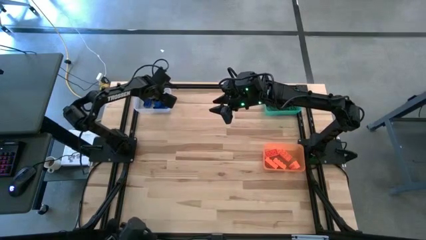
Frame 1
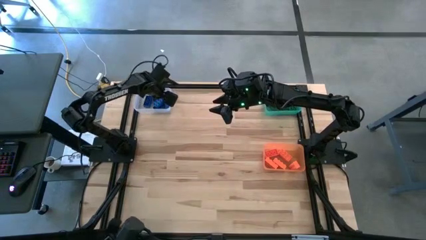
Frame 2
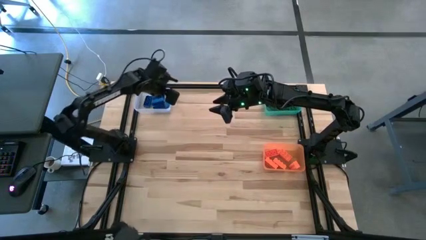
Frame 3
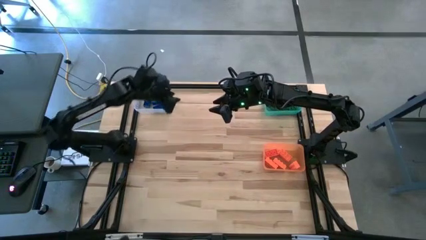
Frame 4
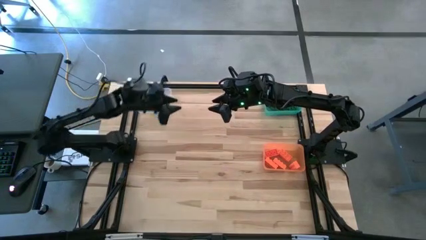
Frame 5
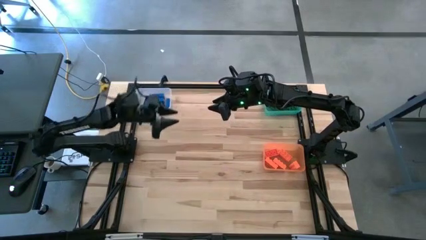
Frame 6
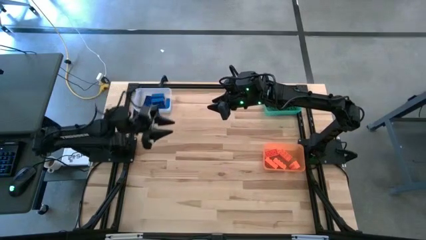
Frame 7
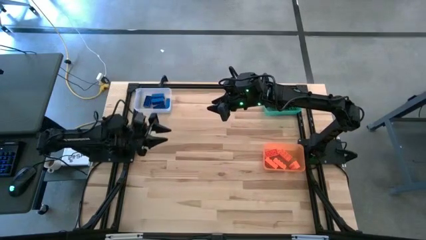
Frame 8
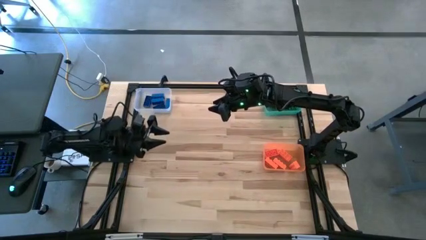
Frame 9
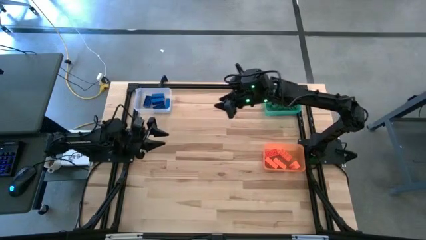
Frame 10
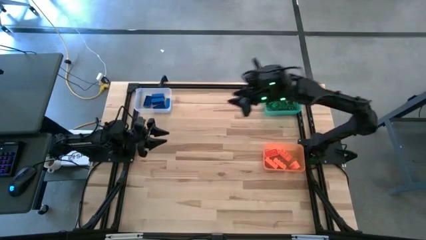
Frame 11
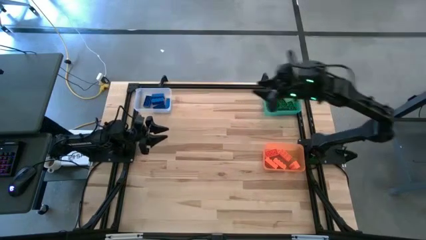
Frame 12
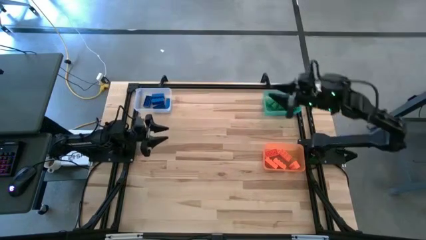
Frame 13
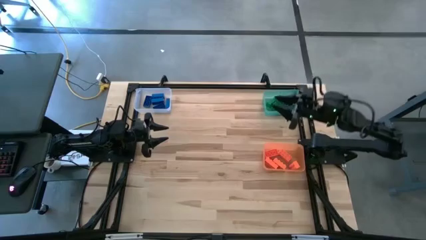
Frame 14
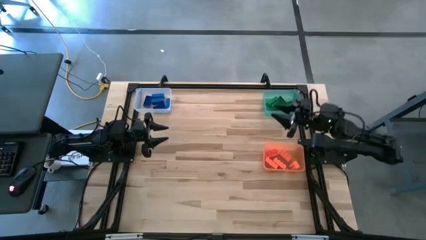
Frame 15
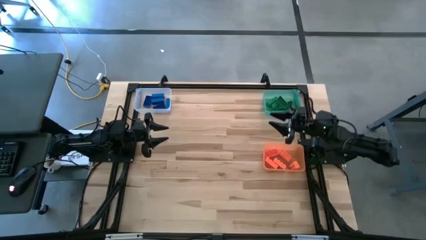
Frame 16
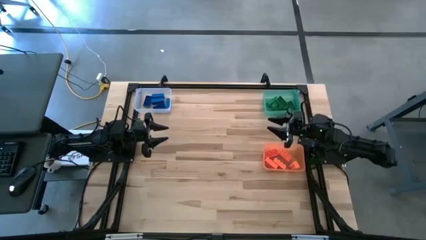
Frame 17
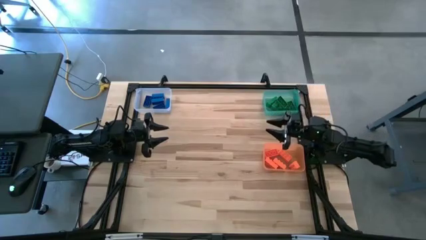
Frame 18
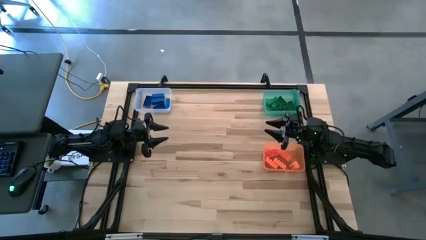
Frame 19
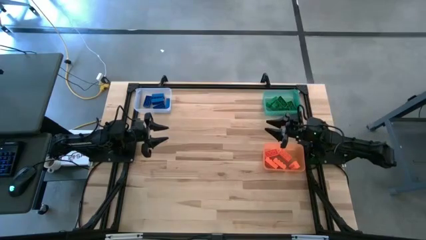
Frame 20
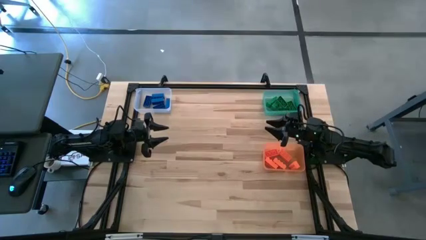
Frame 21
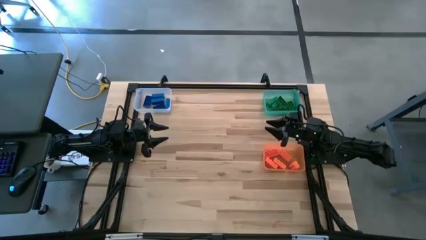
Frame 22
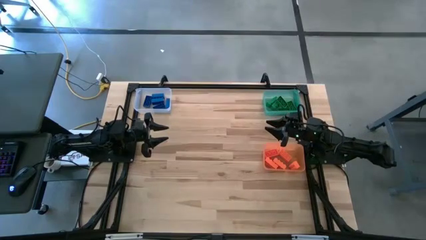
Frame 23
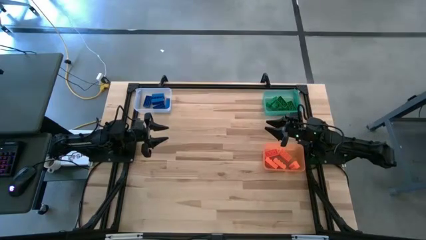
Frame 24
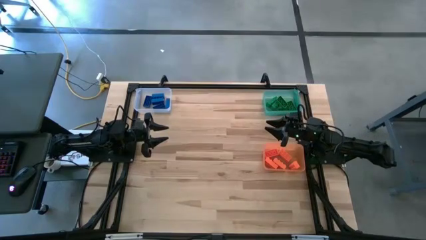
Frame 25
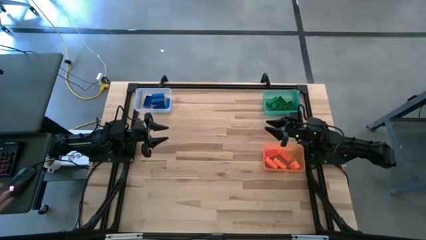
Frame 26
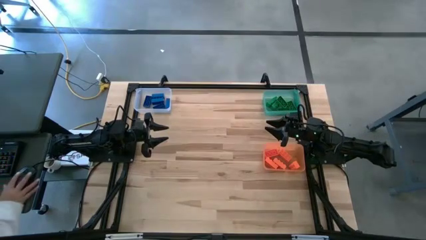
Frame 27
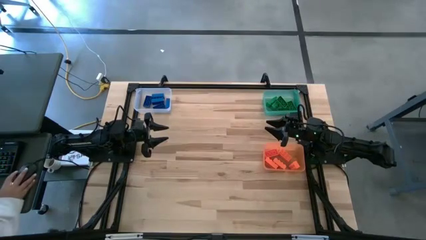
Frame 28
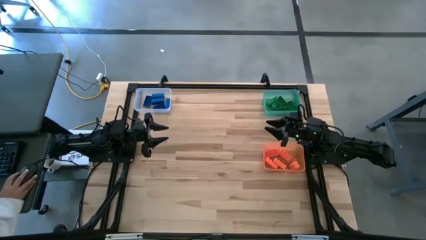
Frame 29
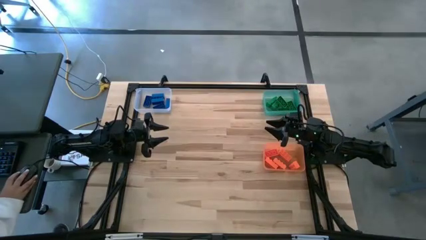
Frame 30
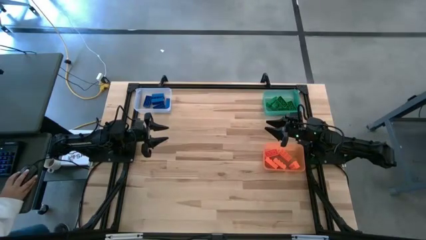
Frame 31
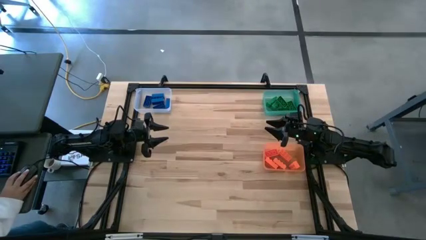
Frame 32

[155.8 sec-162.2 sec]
Task: Sort & place blocks by color
Return to Home Position

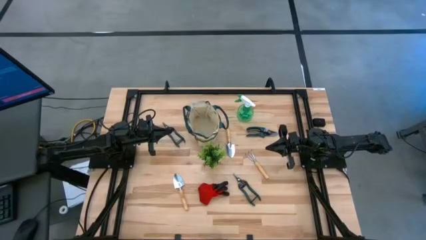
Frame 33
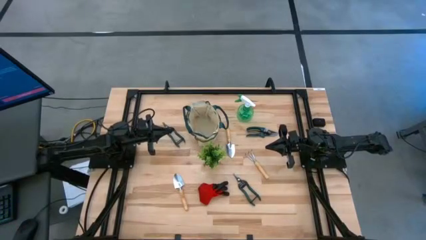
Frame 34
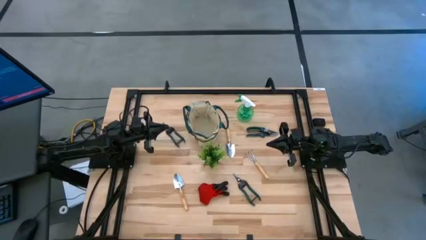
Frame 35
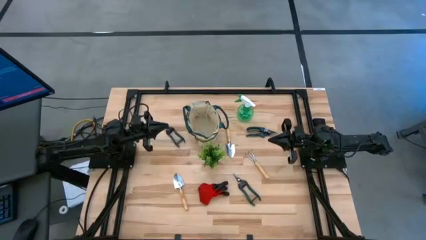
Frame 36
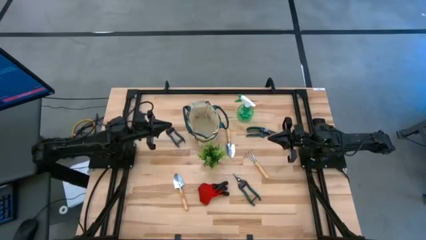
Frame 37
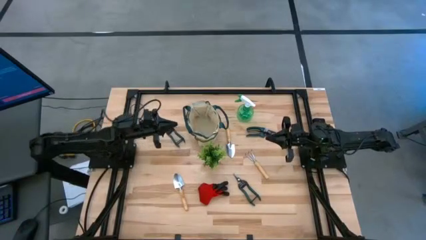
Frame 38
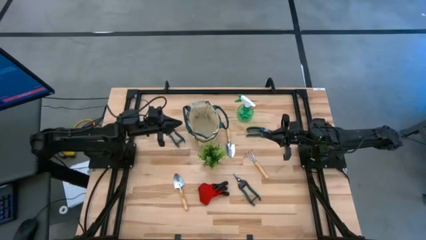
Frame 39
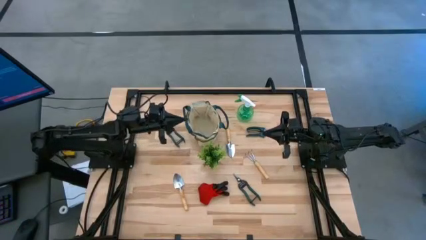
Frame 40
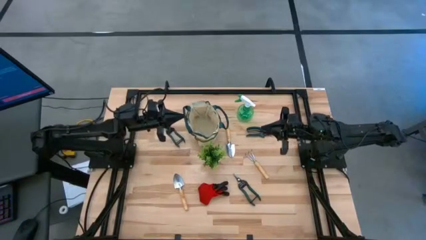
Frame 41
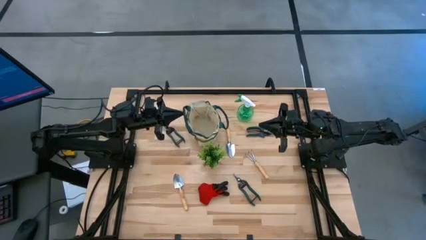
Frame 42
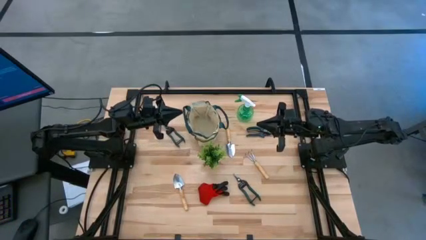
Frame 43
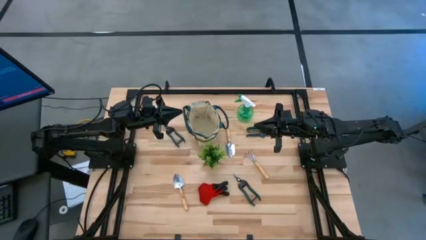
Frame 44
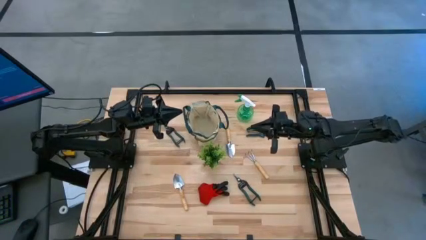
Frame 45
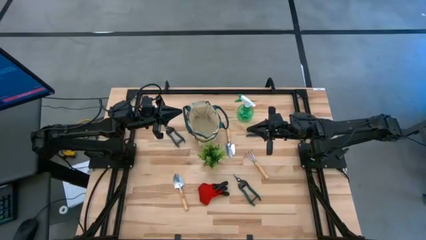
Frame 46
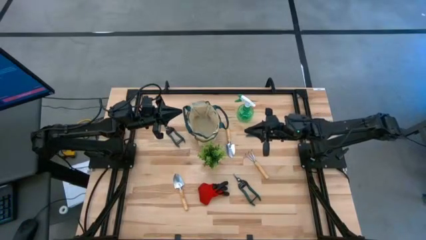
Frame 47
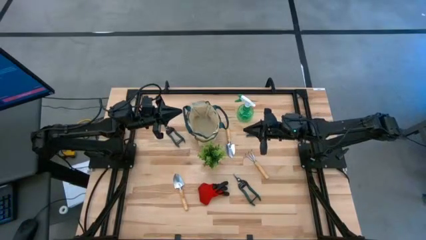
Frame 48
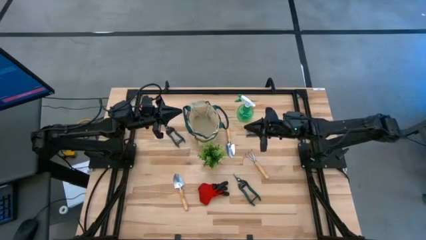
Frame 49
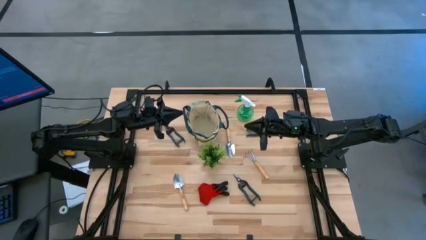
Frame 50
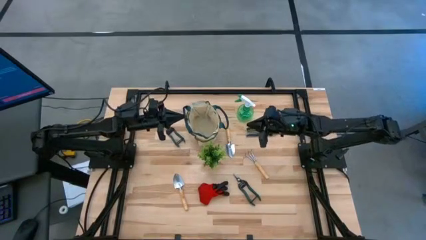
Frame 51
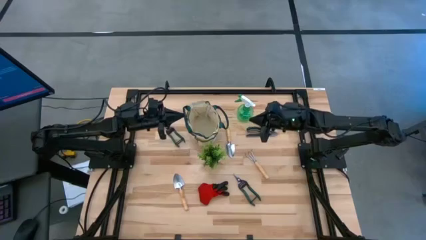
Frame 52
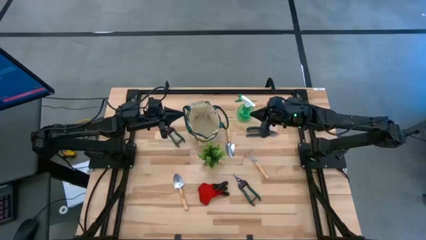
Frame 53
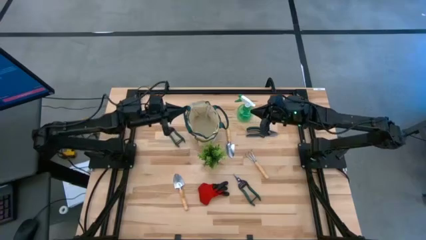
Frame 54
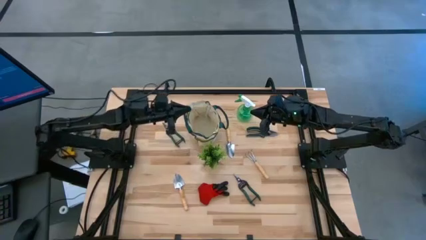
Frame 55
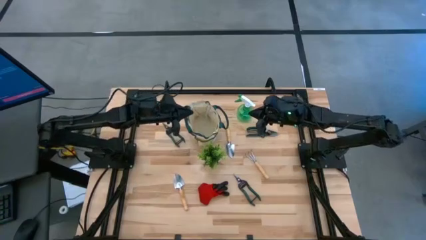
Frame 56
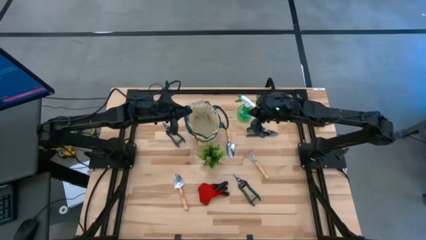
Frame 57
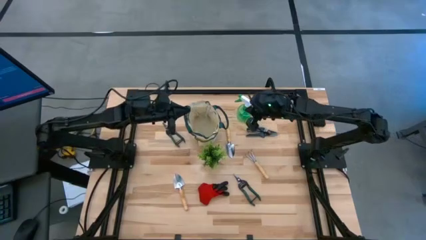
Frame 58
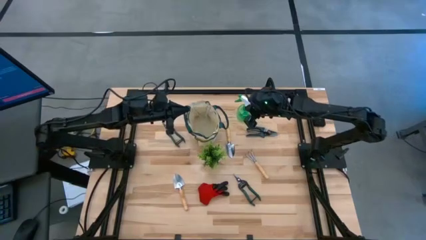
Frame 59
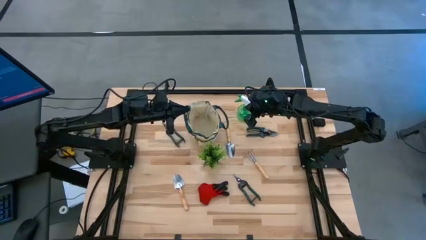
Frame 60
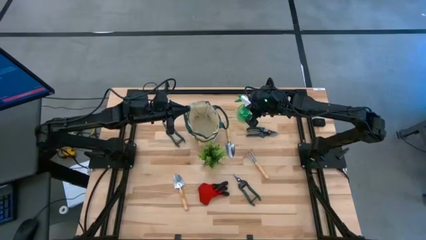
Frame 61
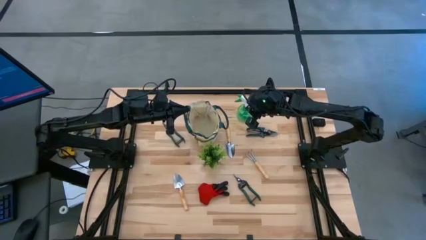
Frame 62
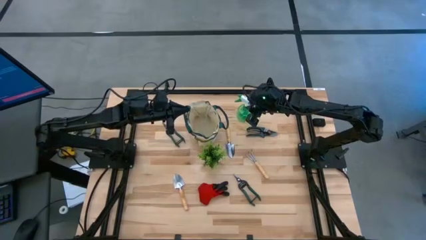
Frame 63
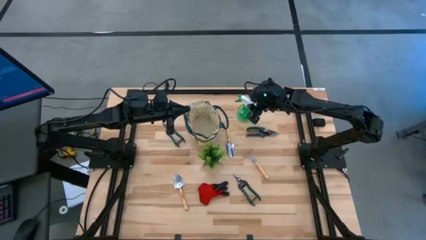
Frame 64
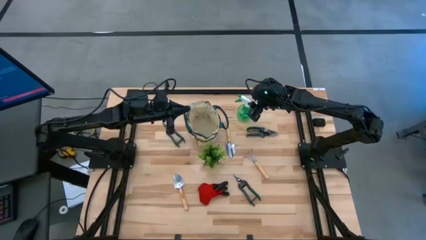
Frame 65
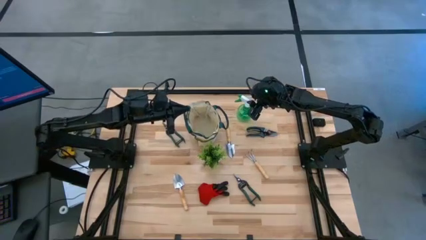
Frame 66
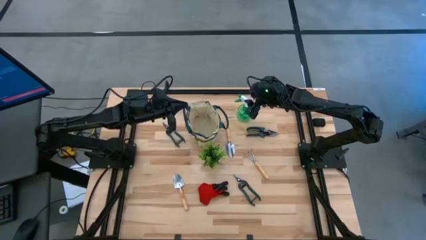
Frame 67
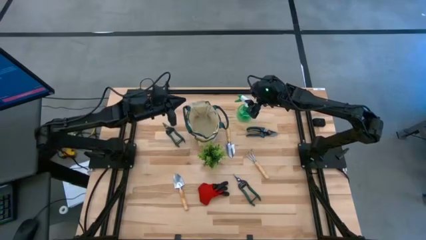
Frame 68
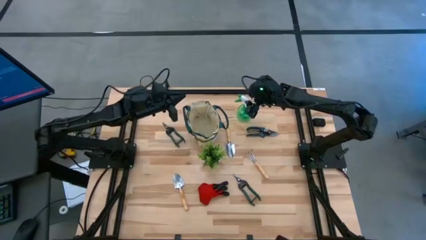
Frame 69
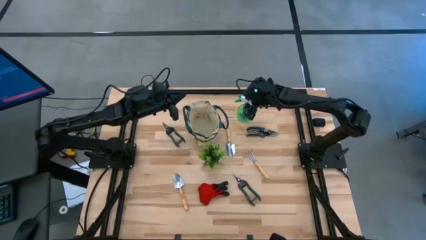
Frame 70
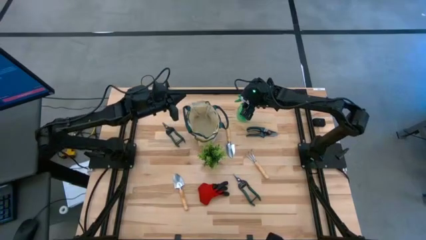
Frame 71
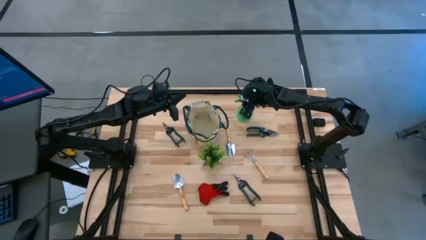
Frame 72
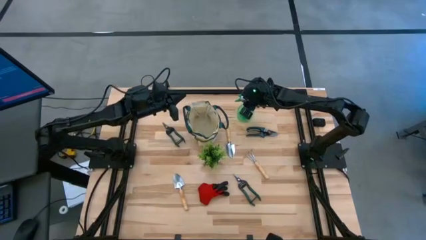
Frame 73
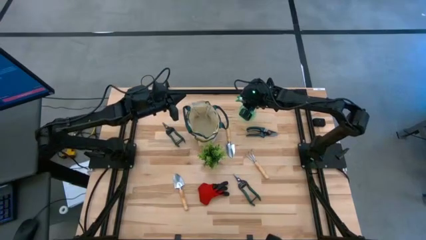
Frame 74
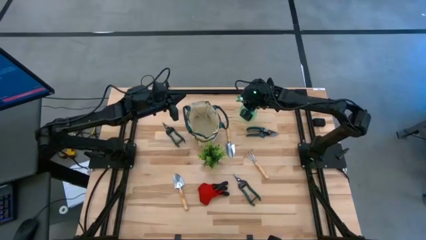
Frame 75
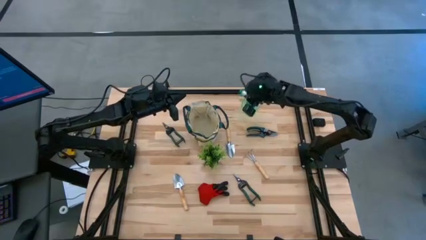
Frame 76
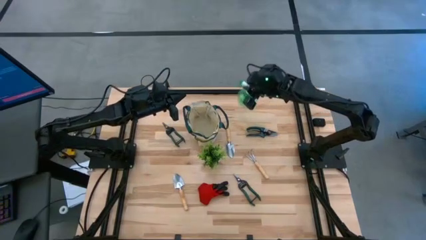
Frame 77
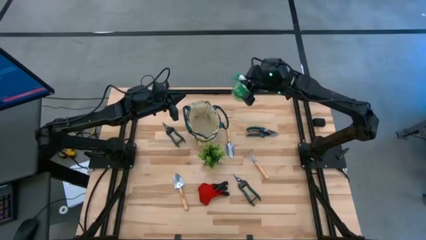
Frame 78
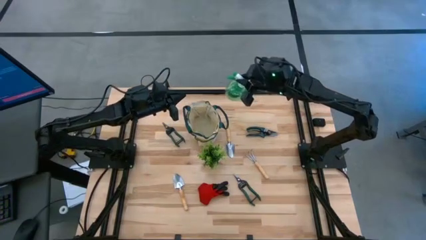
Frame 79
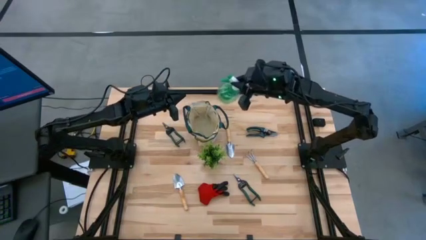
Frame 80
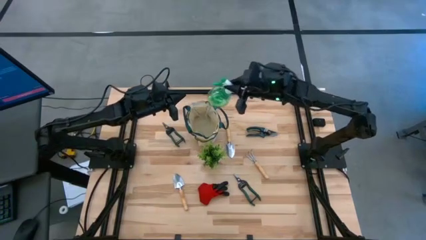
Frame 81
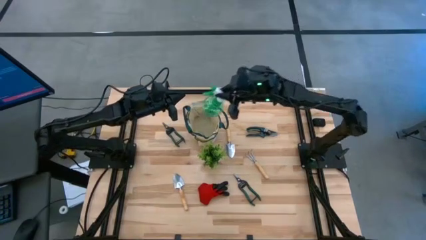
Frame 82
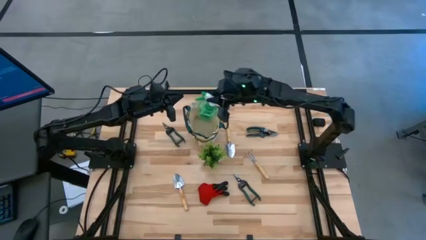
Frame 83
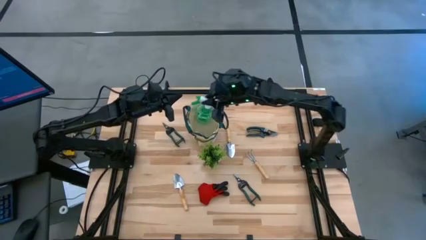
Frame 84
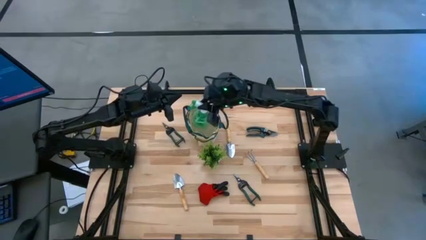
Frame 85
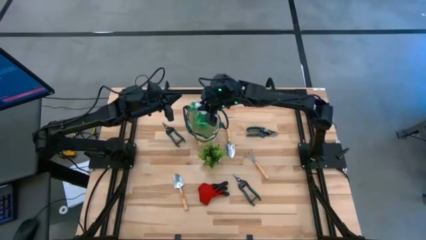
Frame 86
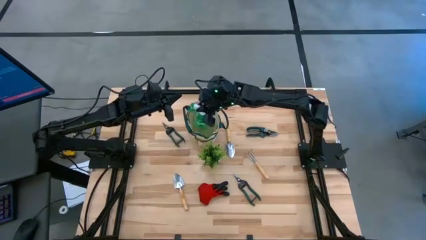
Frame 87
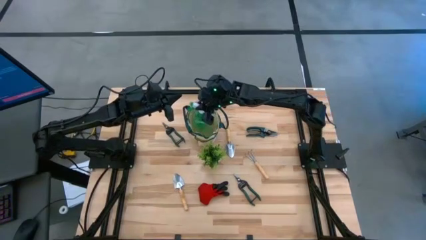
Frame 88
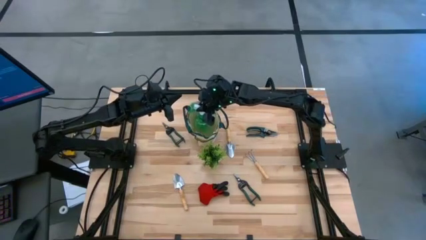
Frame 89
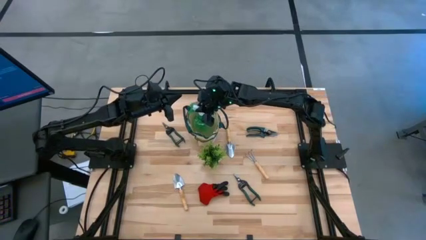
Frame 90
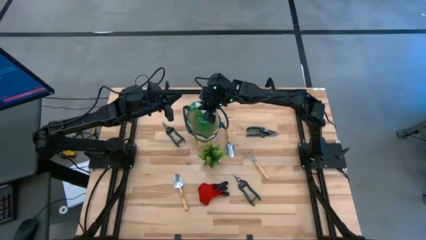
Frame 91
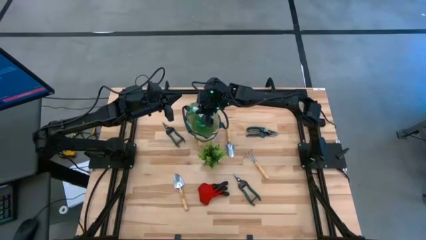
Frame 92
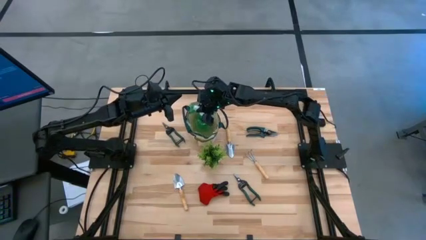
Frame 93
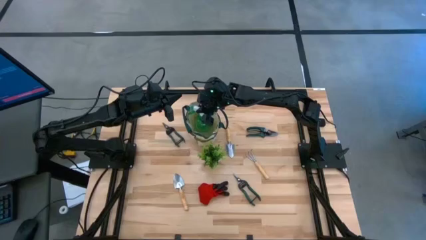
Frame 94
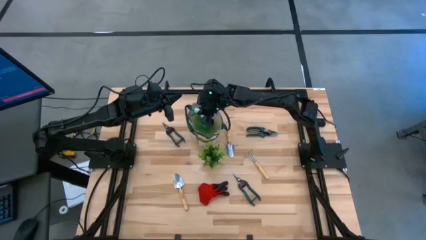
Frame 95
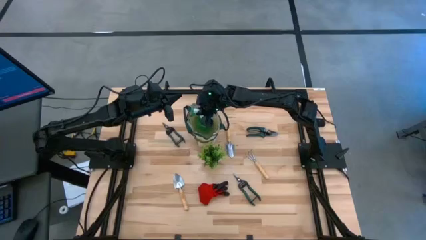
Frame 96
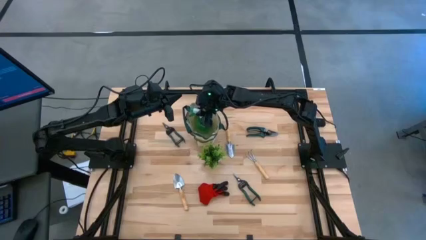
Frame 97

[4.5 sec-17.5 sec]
Task: Pick & Place Garden tools in Gardening bag
Put the green spray bottle into the brown gardening bag
